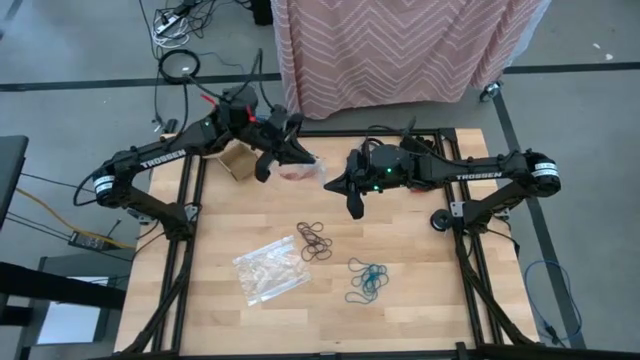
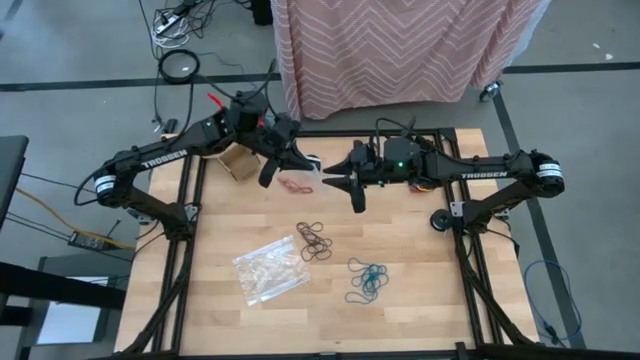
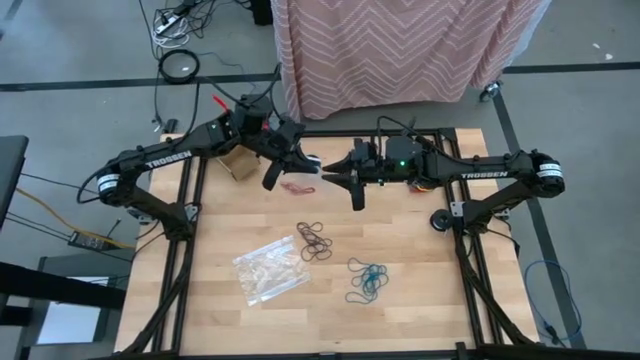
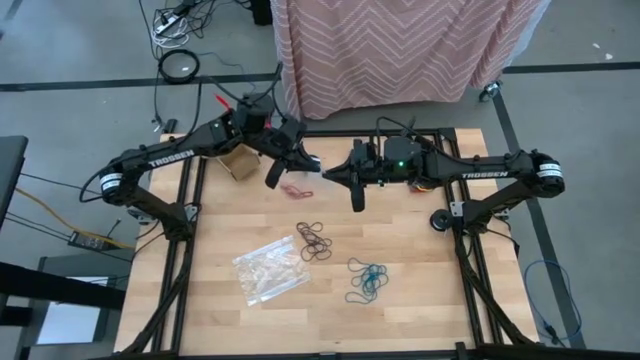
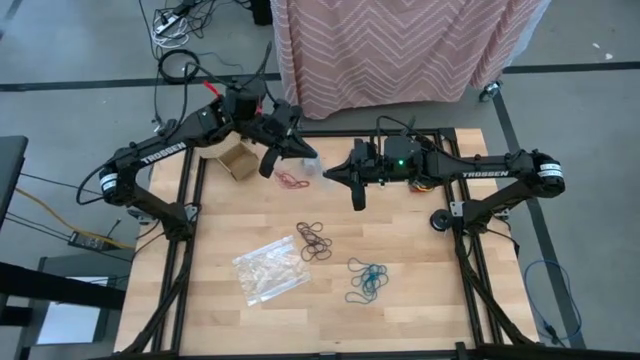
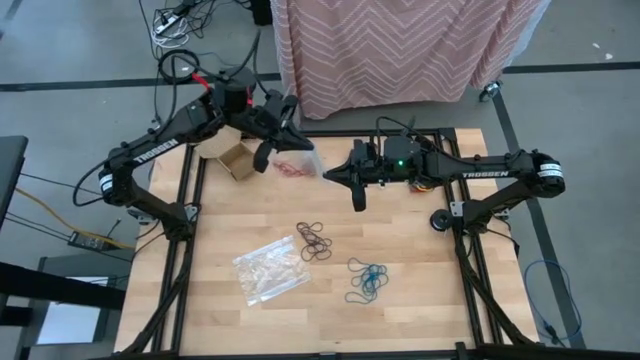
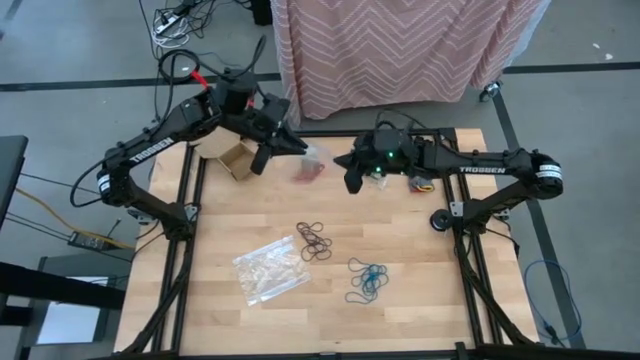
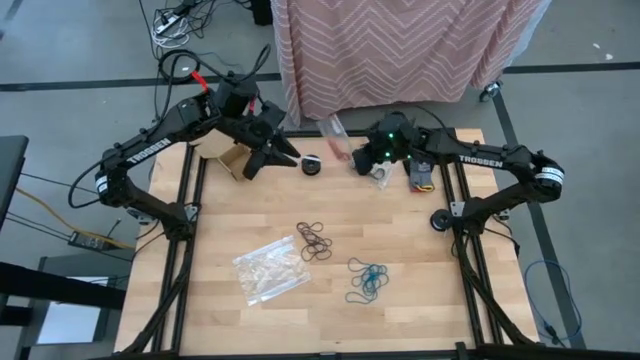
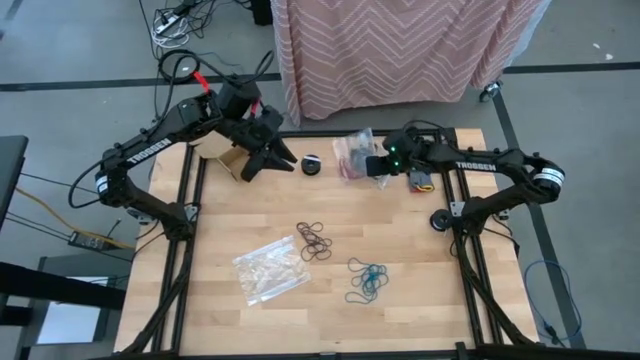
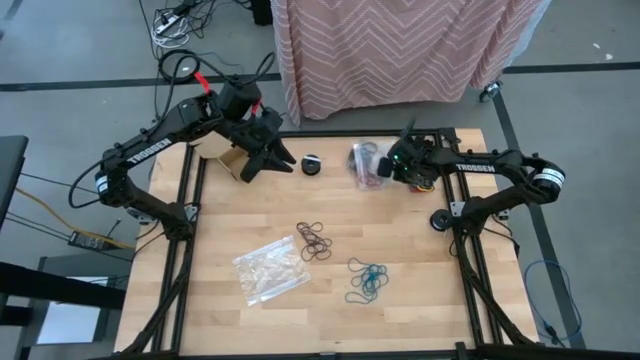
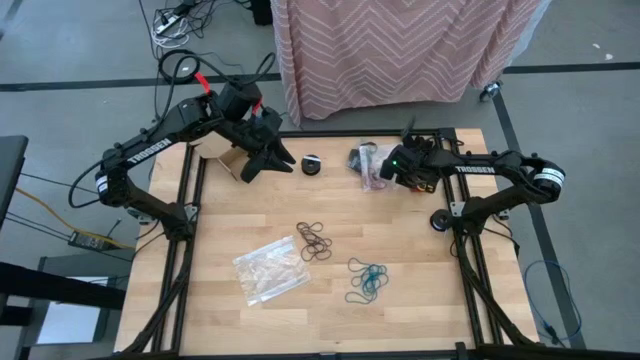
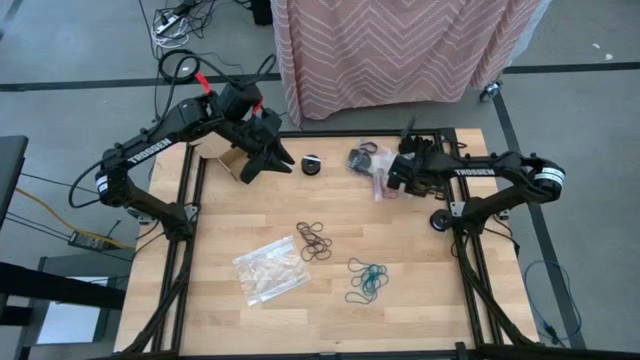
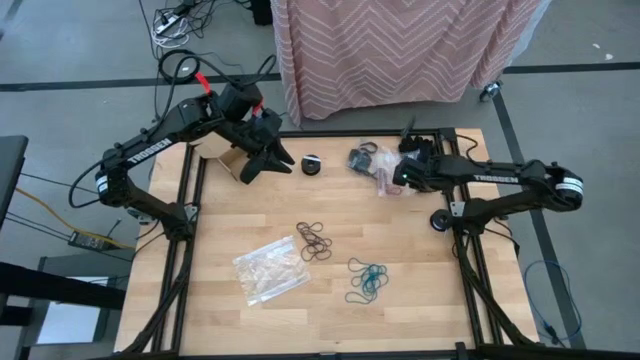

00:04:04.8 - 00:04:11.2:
Task: Sort rubber bands
Close the transparent zip bag

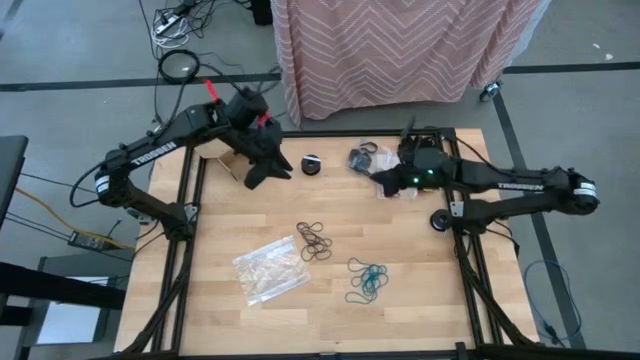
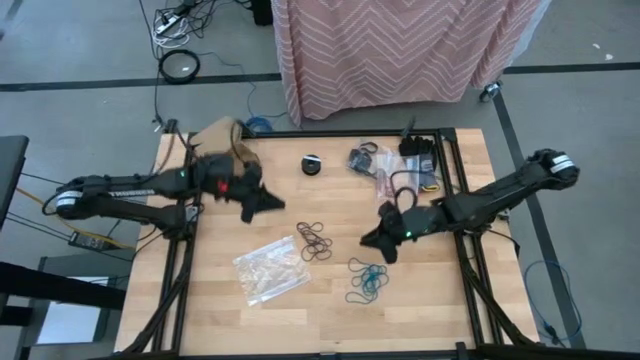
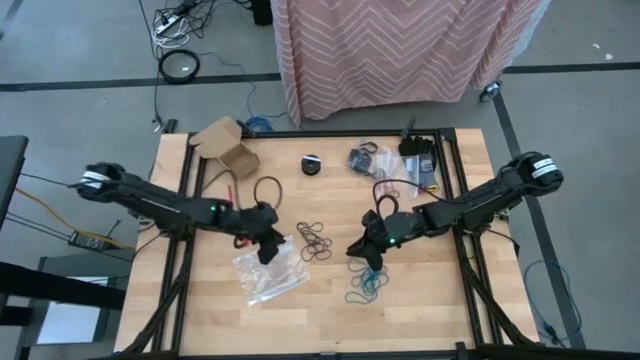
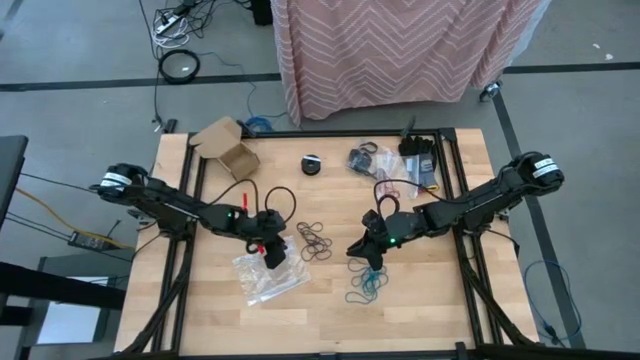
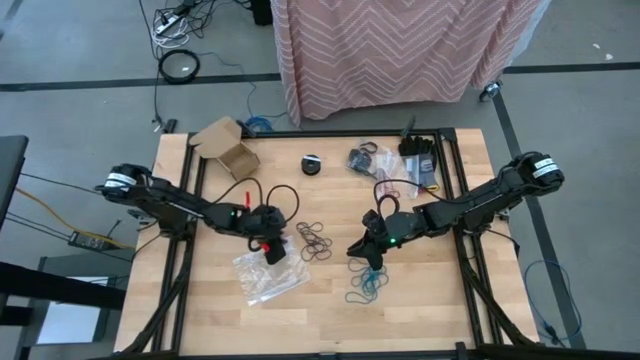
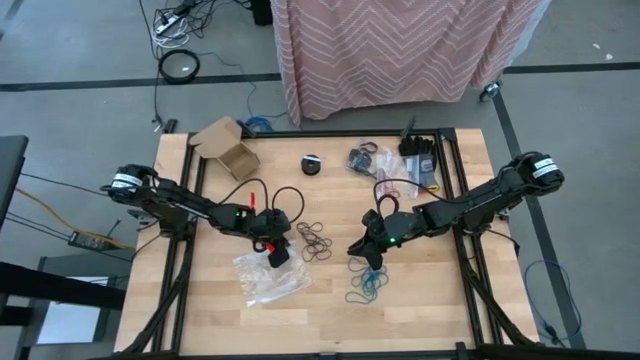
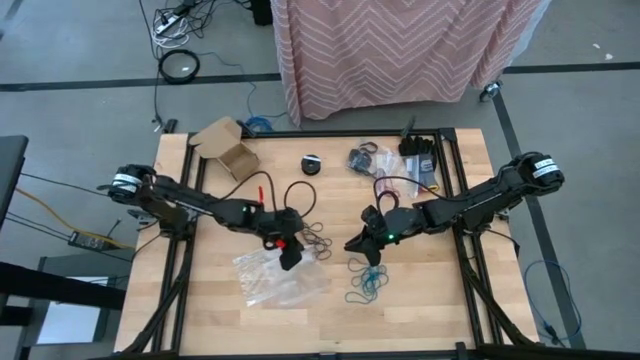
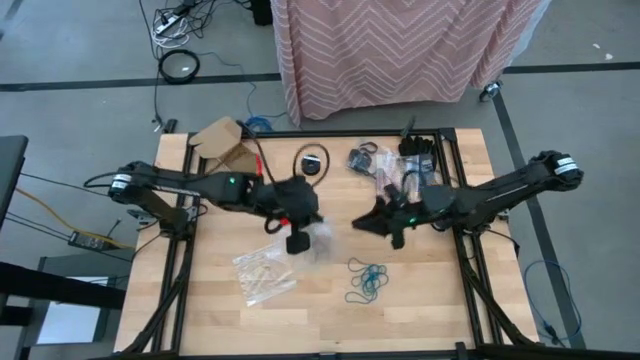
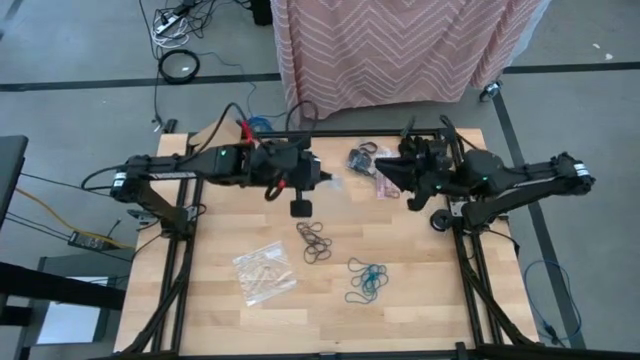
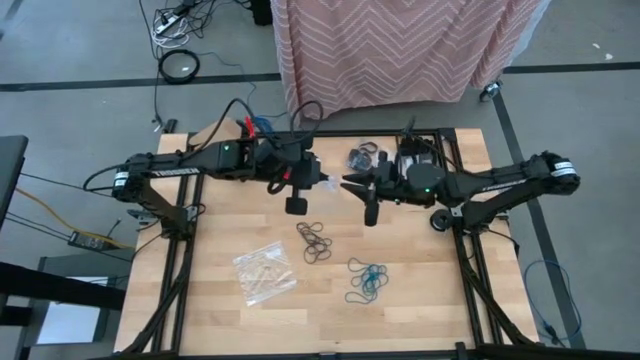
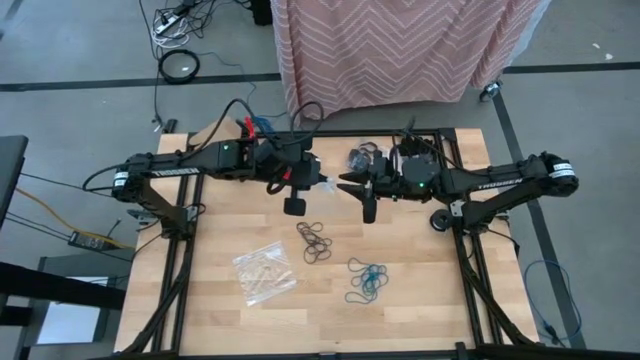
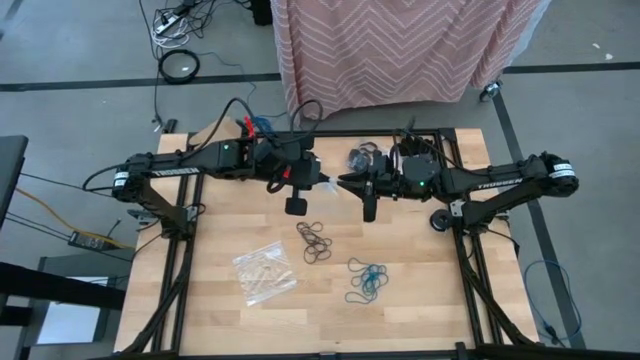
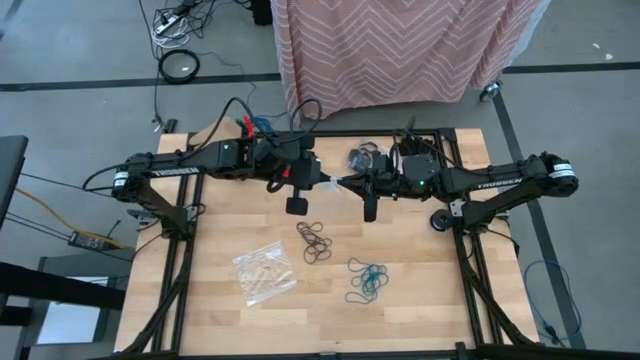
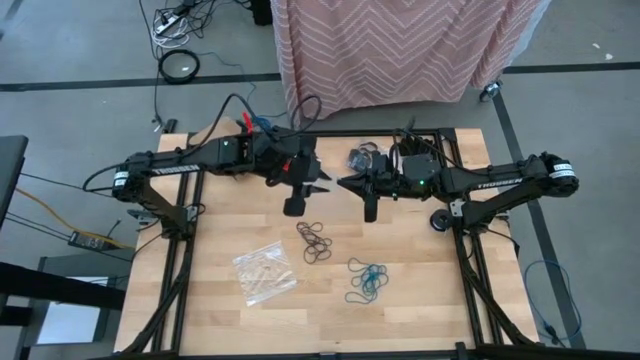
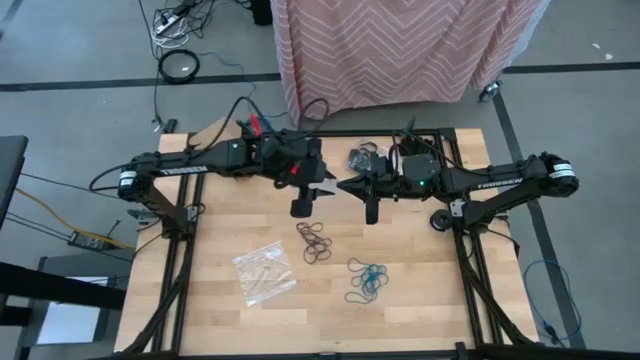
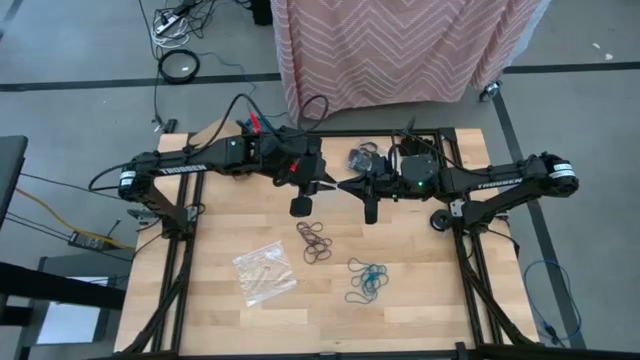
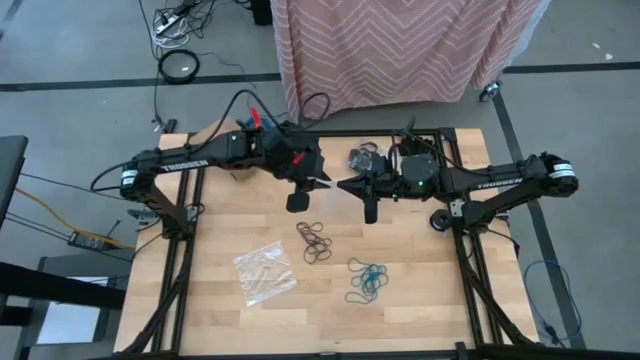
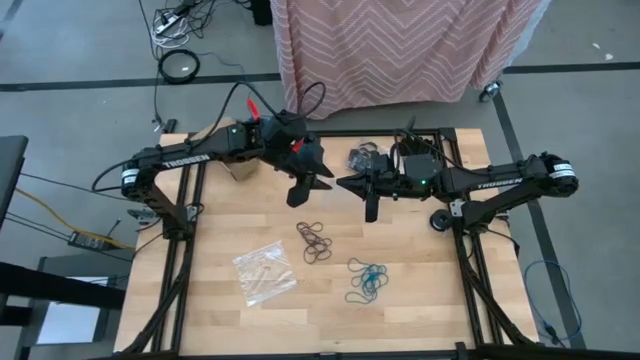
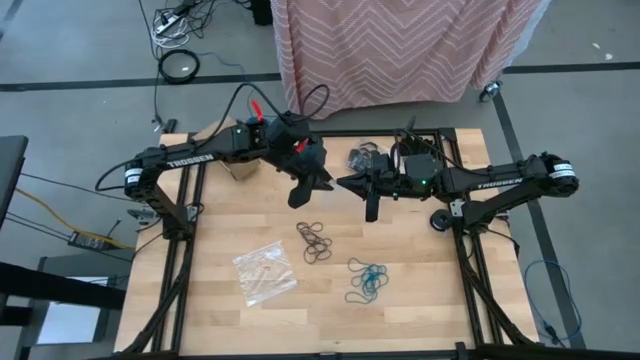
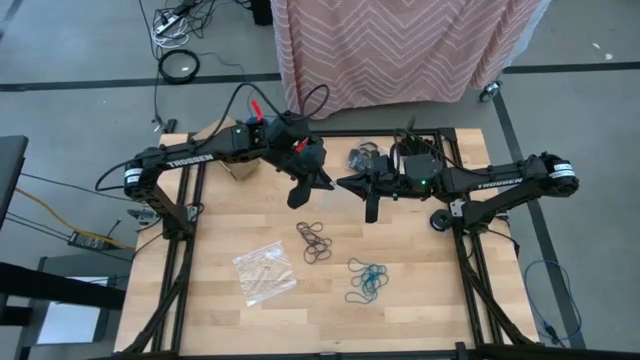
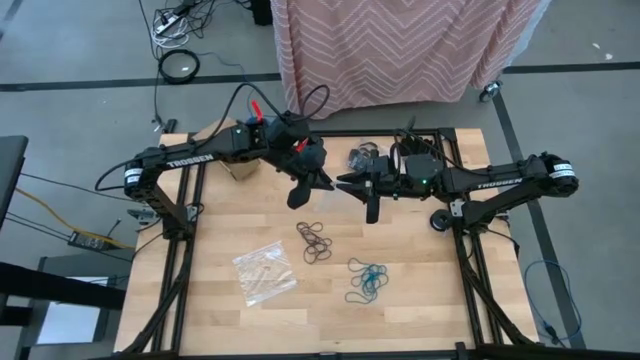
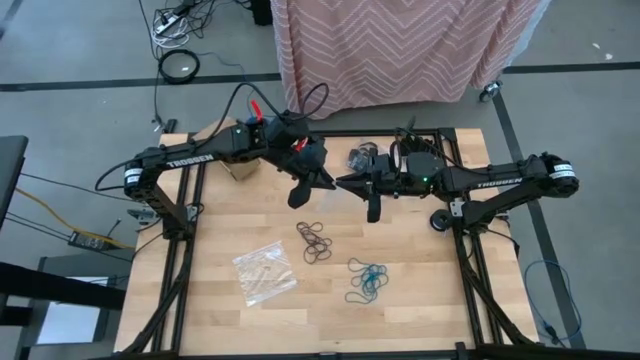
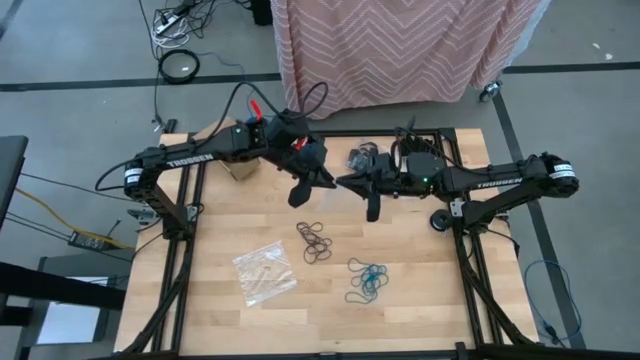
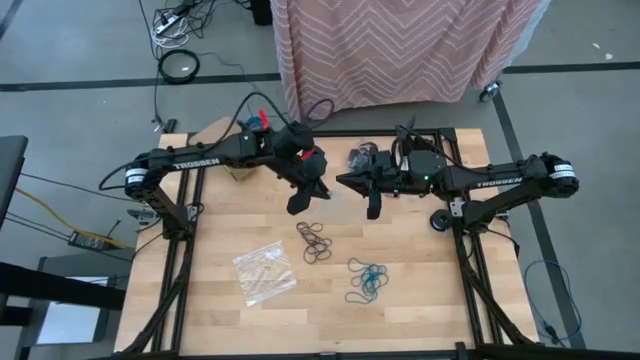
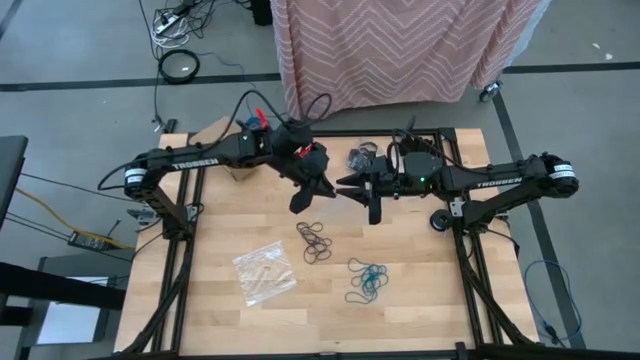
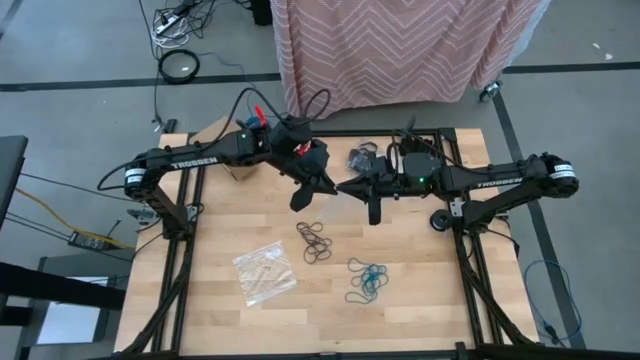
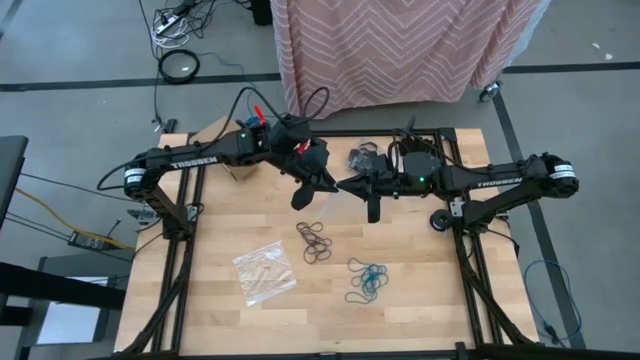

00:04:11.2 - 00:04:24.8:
Open the transparent zip bag

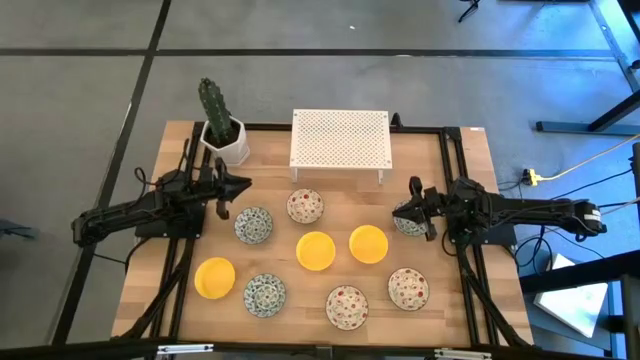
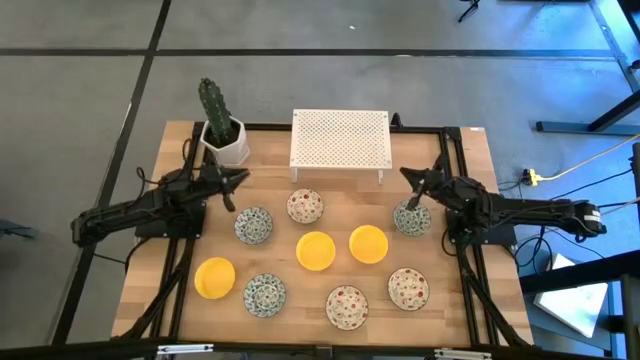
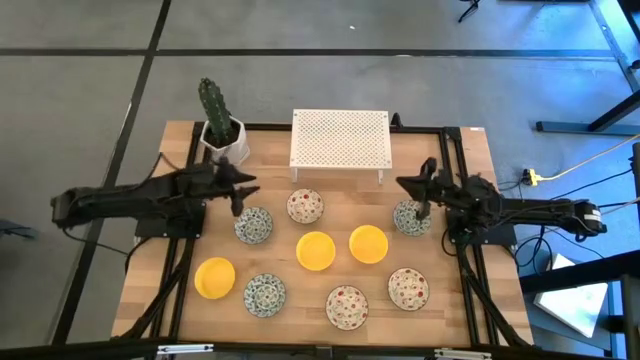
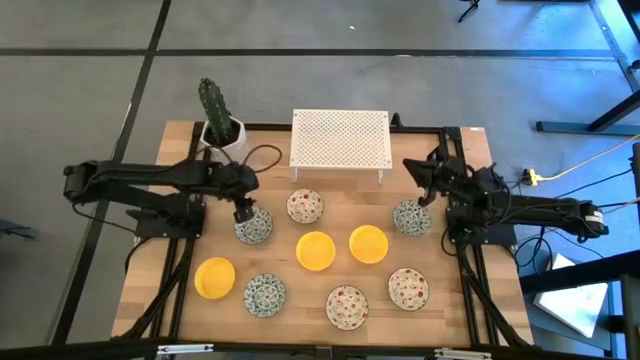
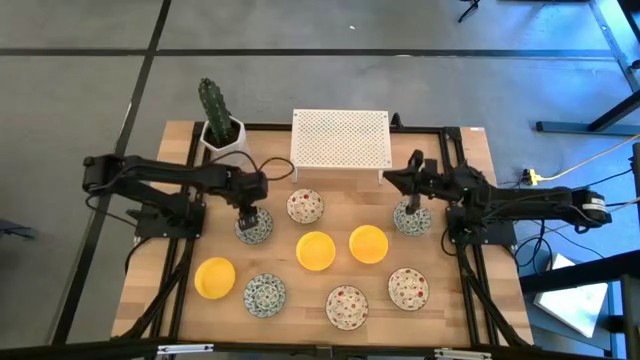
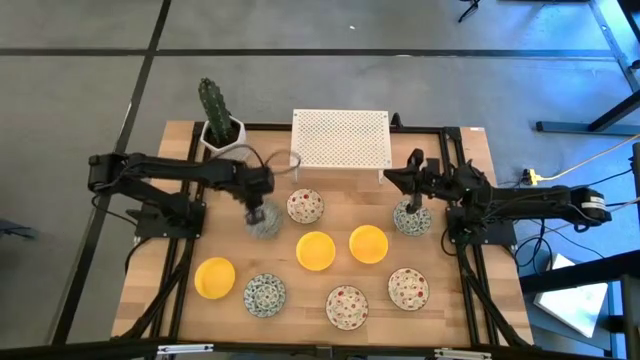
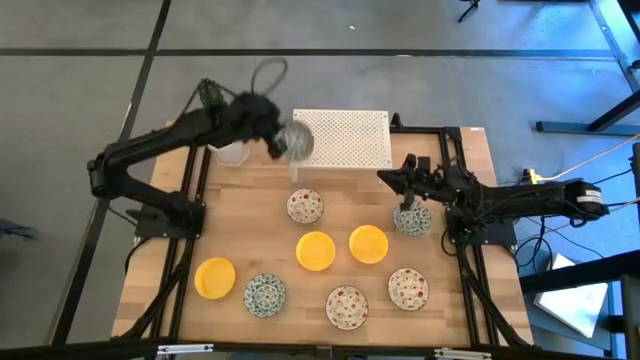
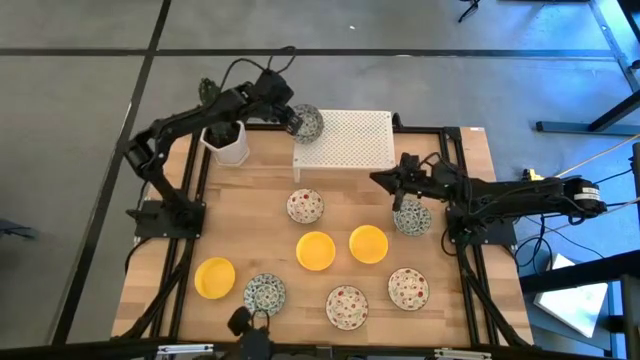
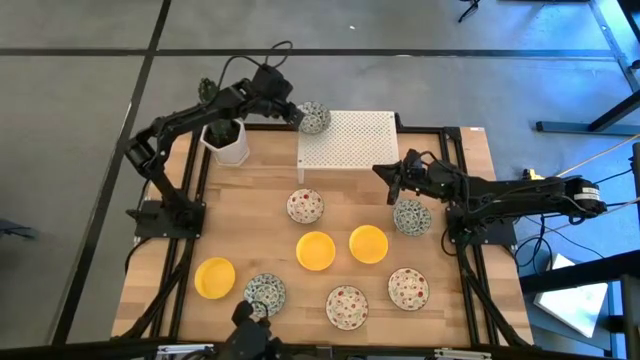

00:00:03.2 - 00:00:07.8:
Task: Pick & Place Mini bowls
Put the top left blue white bowl on the shelf
